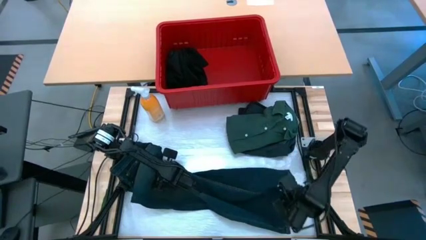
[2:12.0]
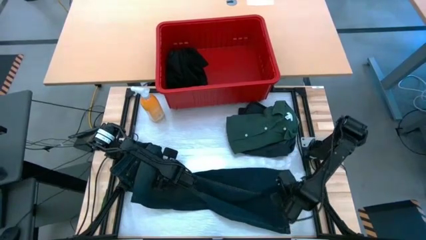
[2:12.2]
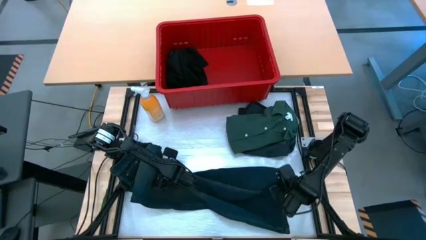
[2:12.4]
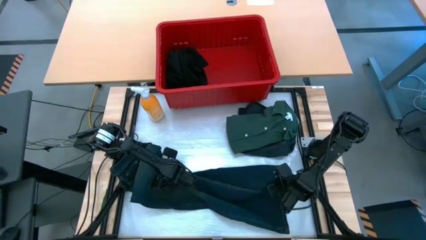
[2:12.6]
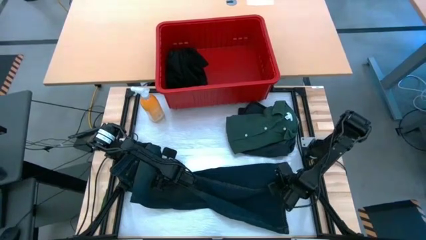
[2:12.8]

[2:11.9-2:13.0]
Task: Fold Laundry from Bin
Fold the blue pants from the red laundry bin

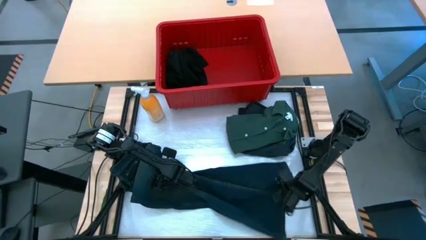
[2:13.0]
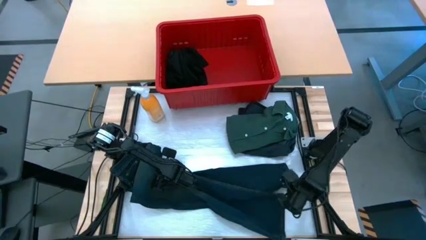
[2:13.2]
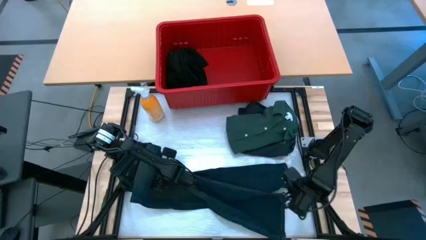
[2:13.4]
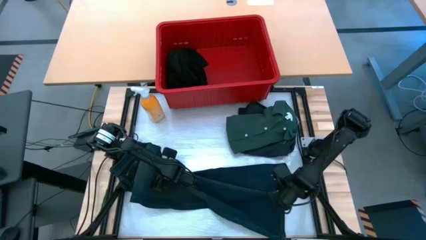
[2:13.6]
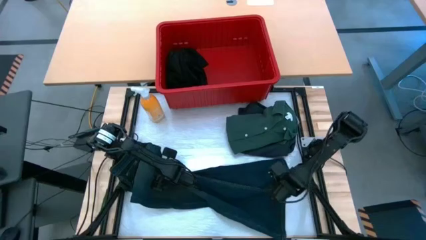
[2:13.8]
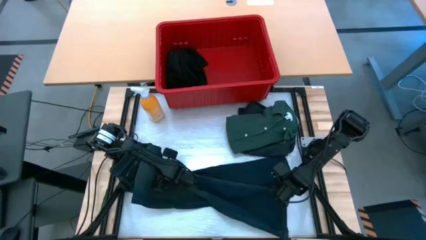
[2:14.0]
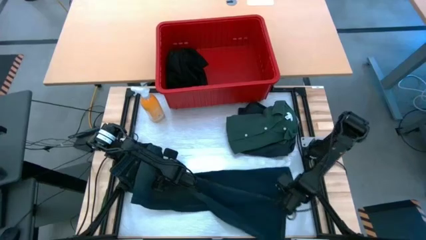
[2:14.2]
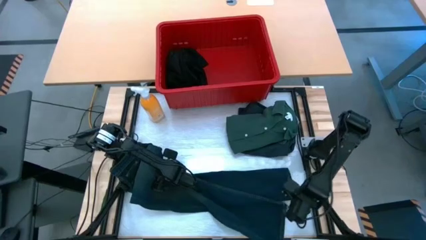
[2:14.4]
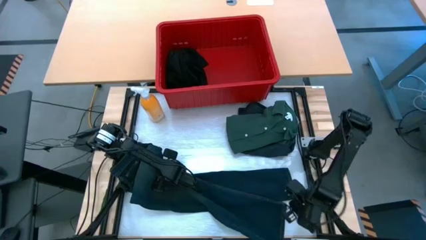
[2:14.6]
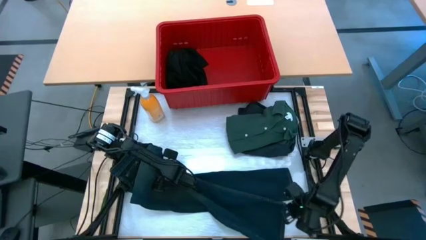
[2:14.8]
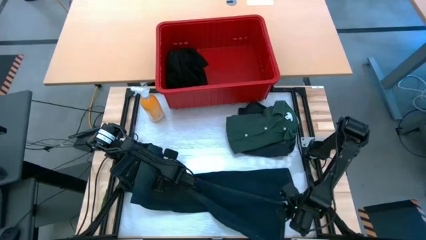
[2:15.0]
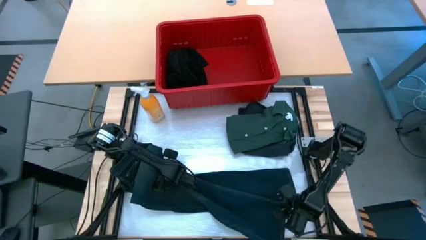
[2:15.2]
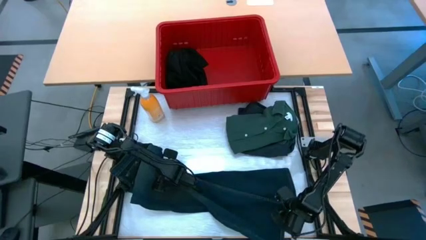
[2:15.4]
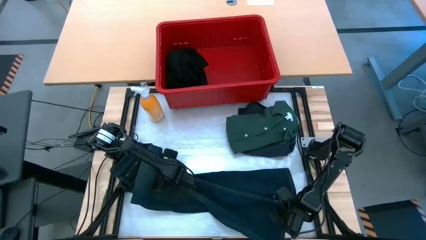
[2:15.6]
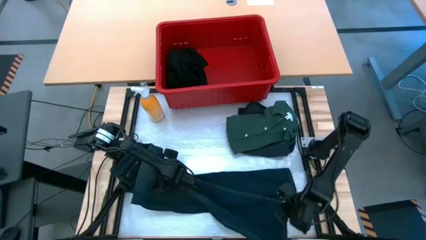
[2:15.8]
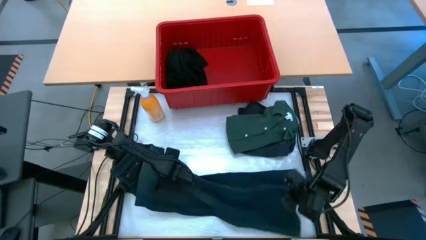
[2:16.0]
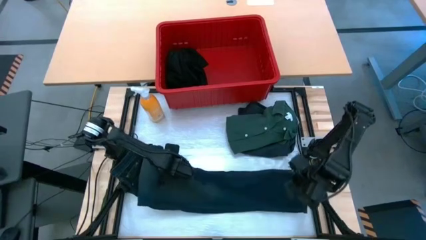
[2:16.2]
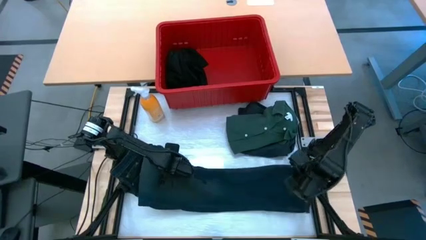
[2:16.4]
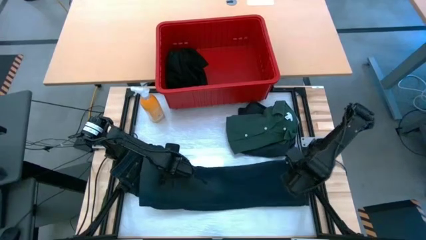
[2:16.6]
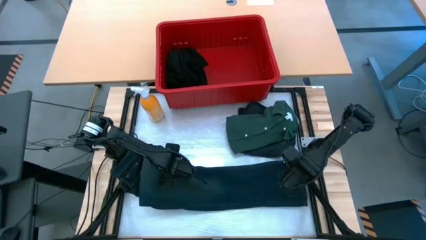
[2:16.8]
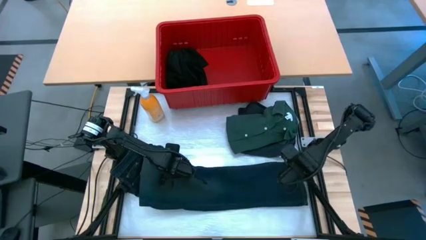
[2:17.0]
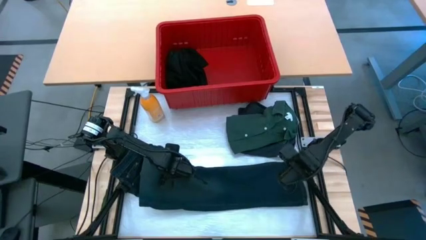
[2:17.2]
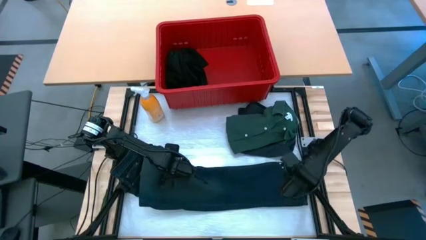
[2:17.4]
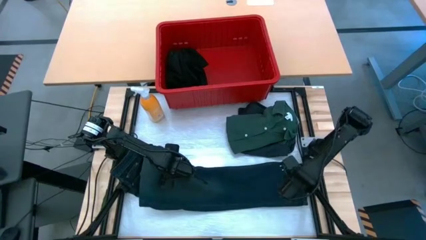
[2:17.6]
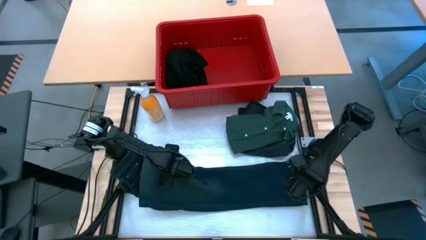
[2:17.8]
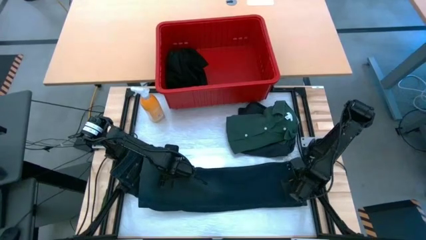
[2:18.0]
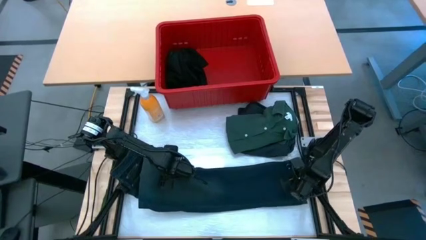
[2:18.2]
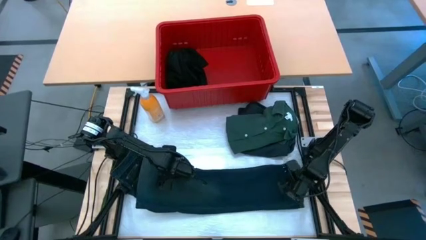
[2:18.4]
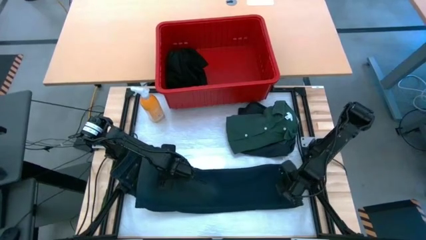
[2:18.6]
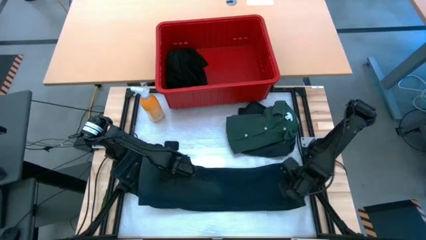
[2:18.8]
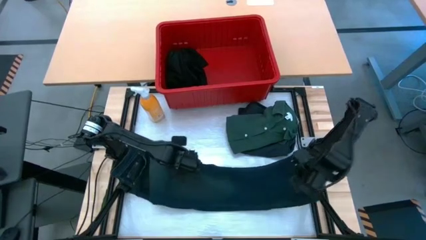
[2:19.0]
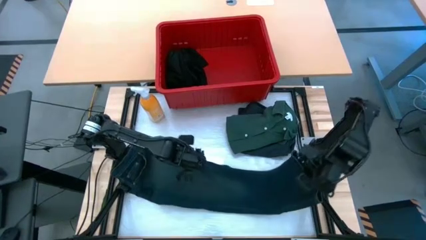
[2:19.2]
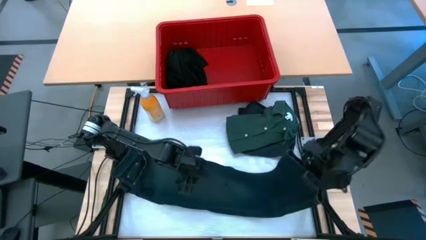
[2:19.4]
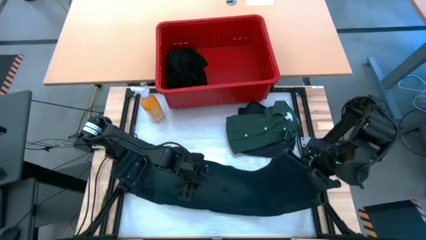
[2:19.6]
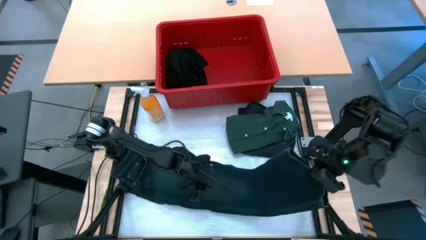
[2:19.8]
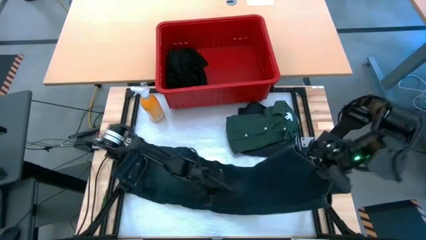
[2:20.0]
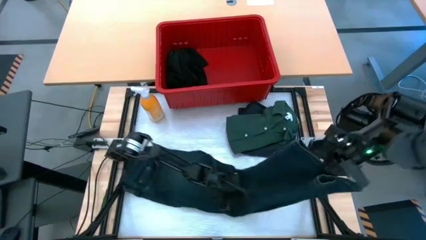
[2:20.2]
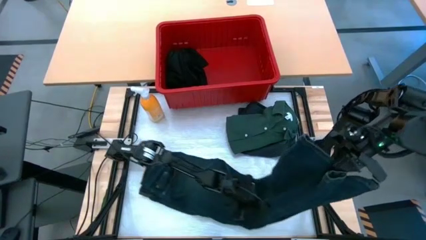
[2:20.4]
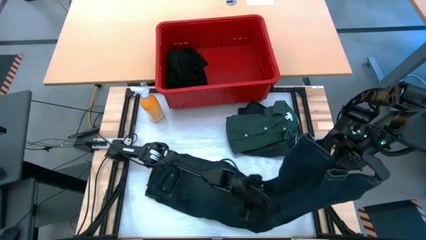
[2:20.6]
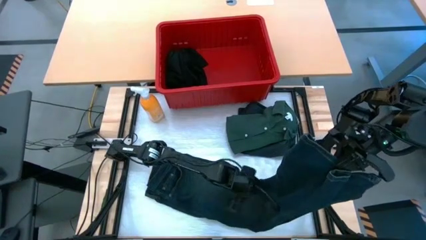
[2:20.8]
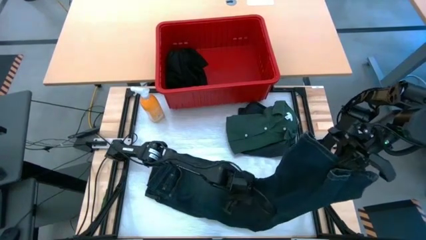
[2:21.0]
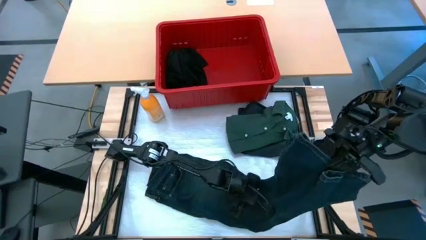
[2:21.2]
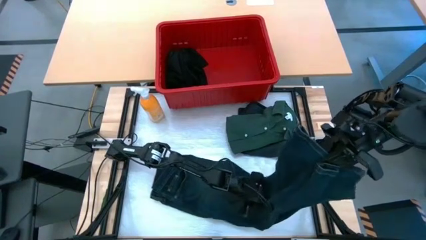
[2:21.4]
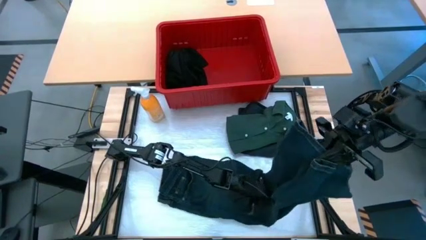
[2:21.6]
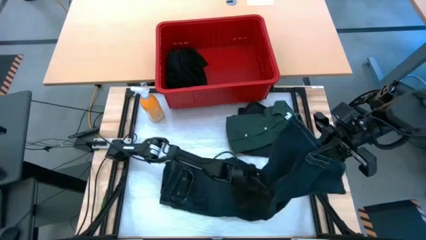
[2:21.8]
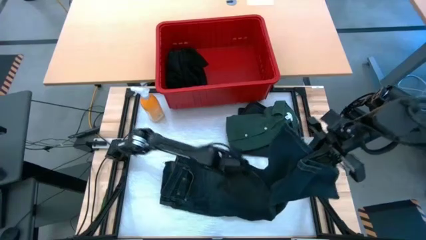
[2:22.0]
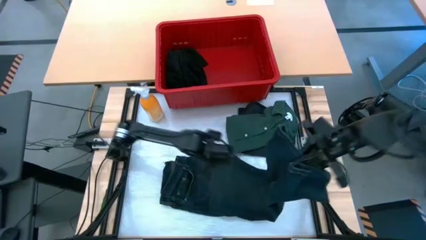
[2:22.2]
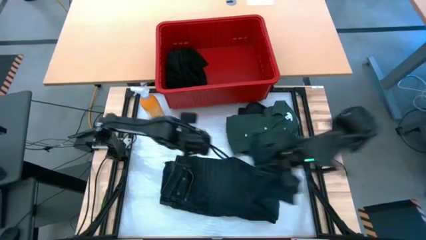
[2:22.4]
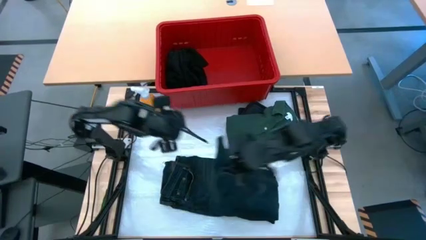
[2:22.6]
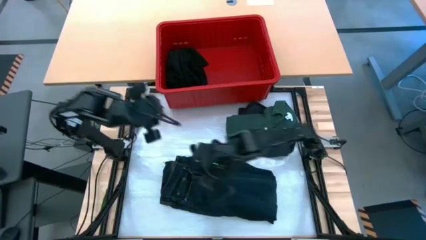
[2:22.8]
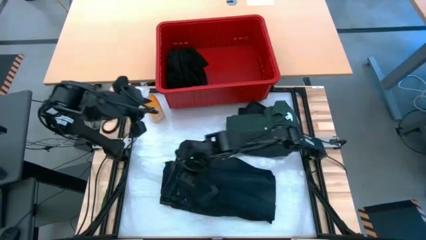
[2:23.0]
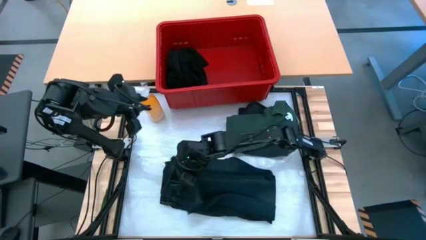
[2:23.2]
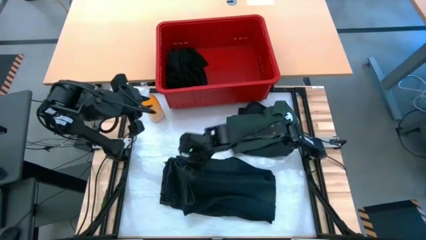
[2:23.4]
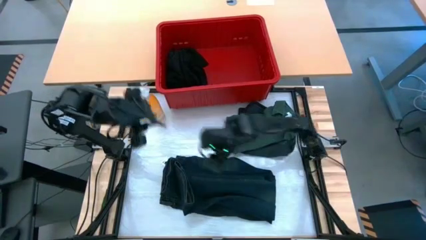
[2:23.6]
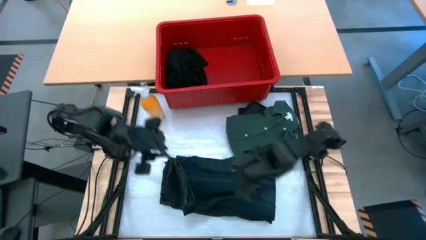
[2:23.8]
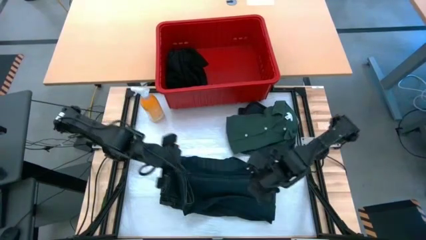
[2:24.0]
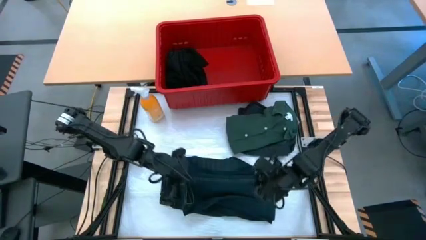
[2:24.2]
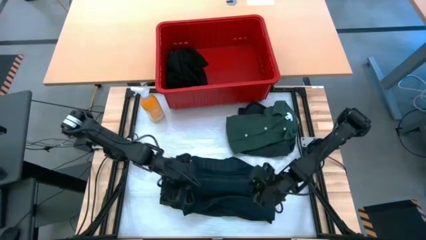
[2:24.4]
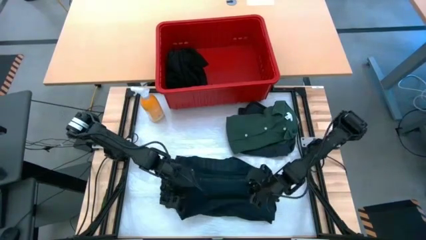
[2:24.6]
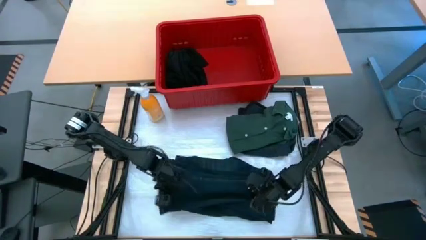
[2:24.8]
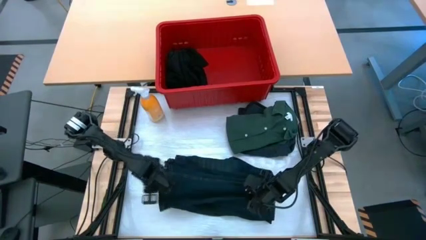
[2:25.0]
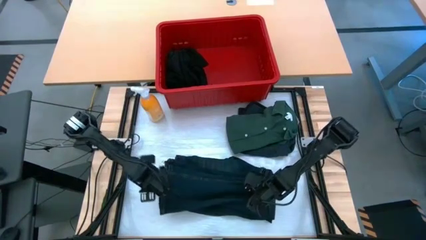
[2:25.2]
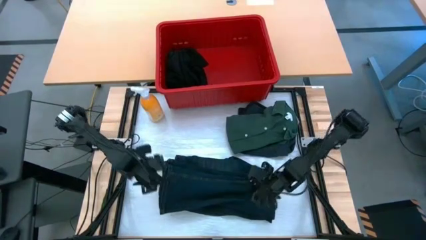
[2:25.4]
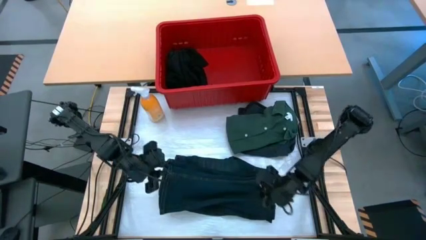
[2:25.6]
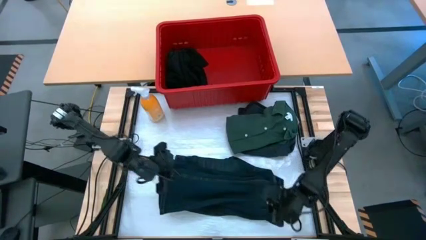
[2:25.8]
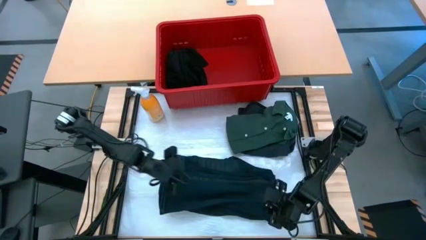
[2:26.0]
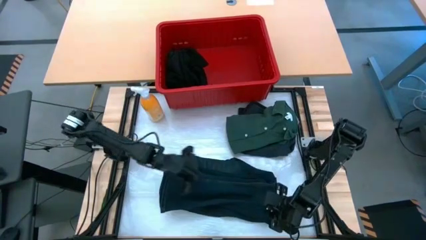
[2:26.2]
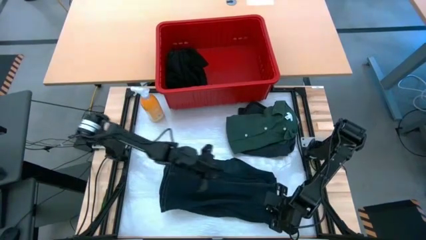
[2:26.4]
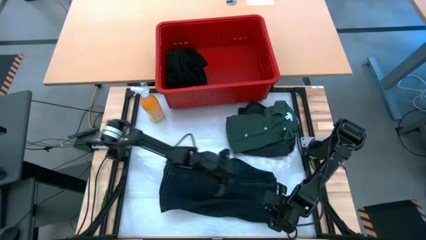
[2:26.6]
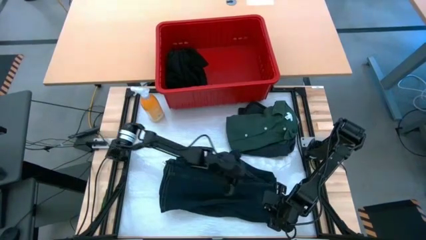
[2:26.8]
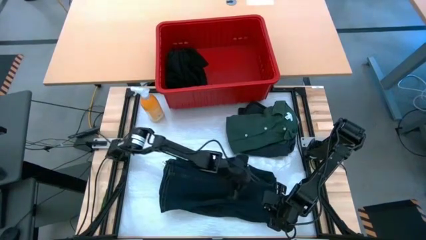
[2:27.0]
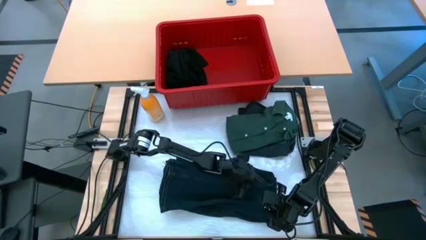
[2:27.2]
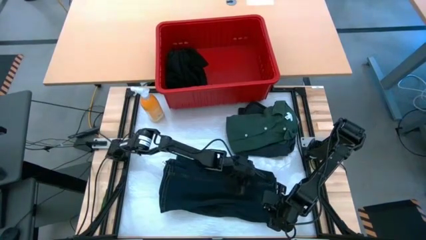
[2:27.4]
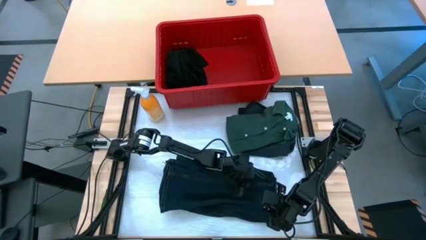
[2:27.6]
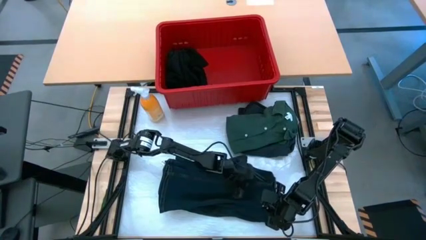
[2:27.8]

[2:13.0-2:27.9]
Fold the blue pants from the bin
